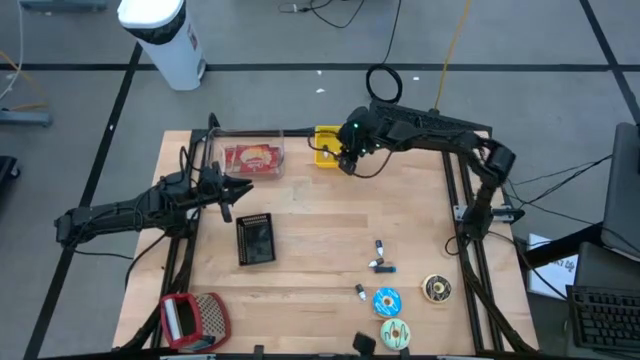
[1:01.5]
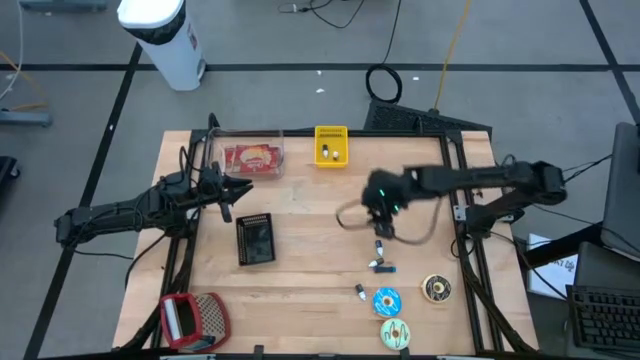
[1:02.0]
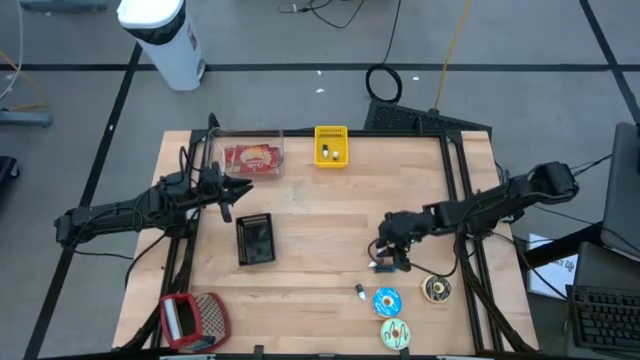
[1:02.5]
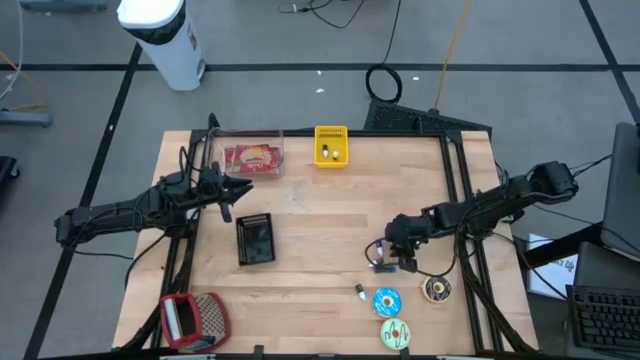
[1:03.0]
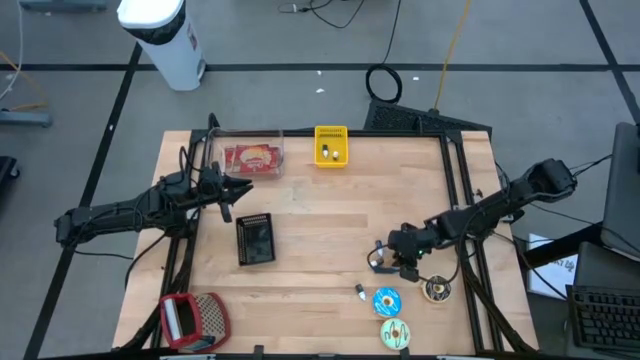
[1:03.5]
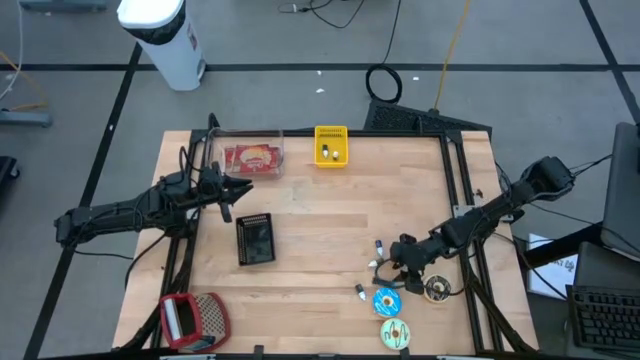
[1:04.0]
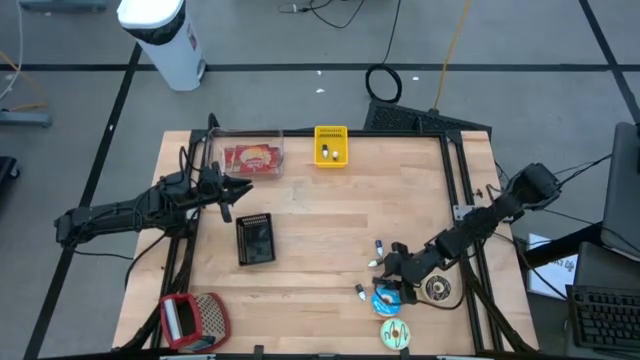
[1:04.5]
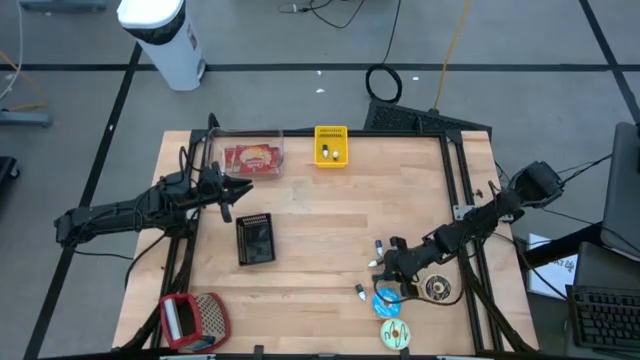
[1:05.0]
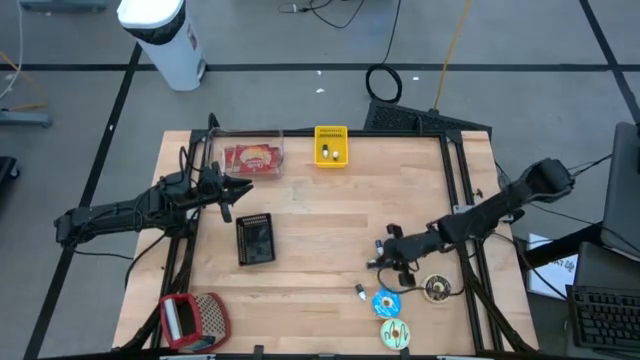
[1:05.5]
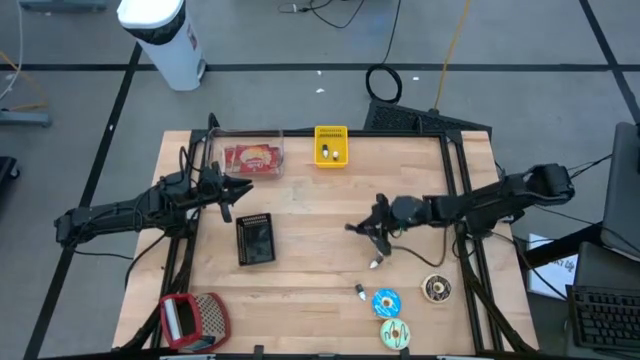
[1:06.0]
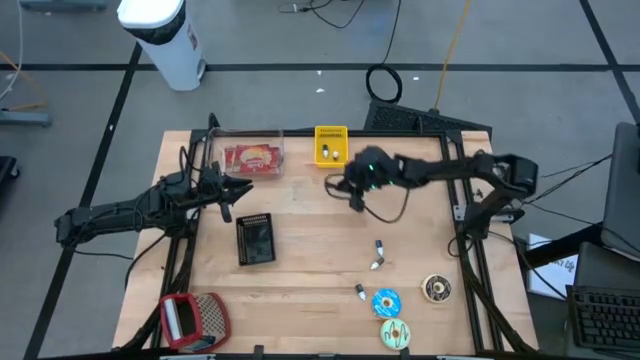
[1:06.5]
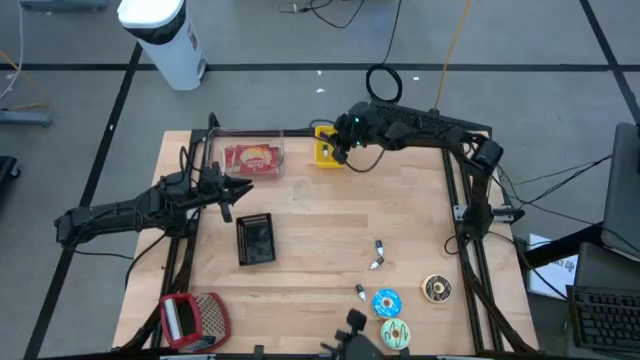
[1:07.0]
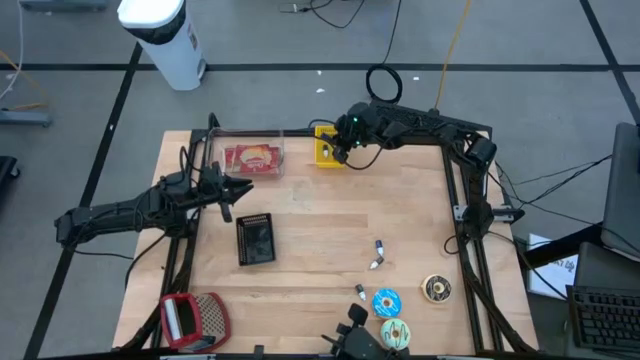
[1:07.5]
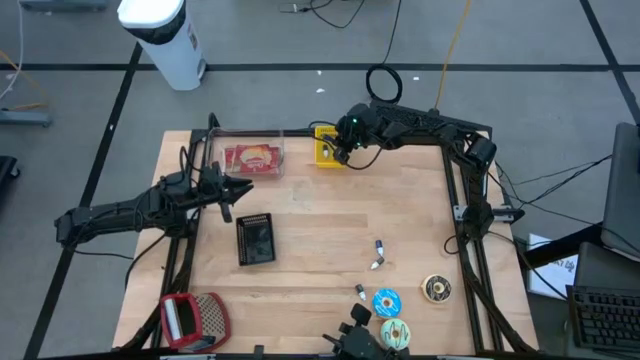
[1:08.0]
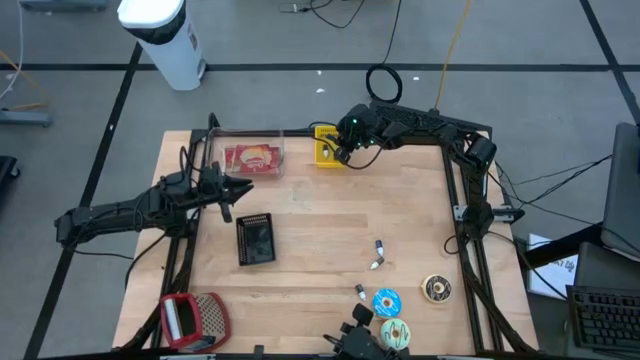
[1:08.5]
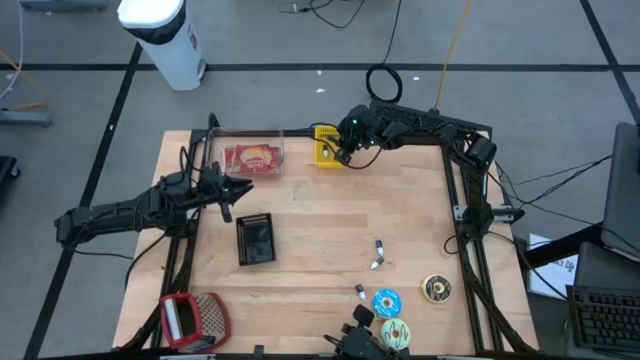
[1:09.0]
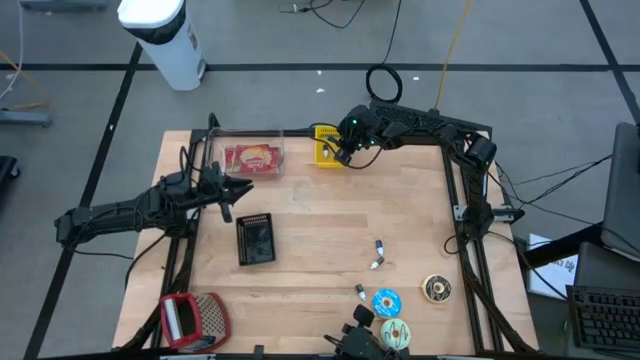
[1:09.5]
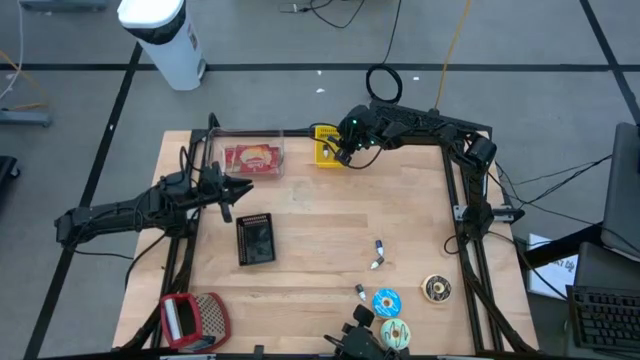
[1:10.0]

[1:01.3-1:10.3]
Task: Pick & Place Food Item
Put the bottom blue food coloring bottle into the yellow bin

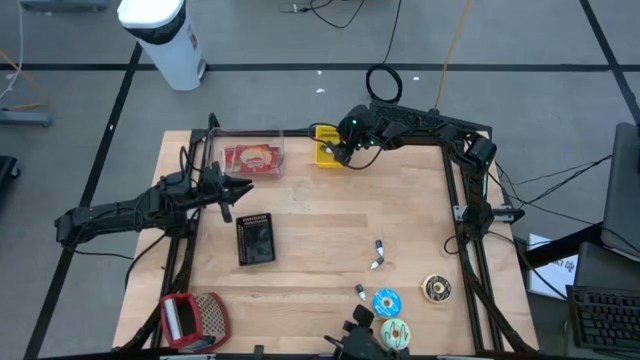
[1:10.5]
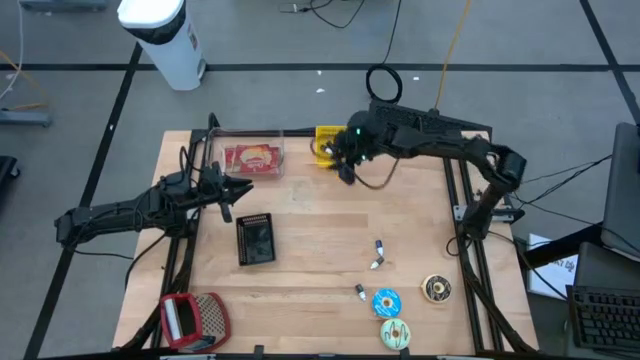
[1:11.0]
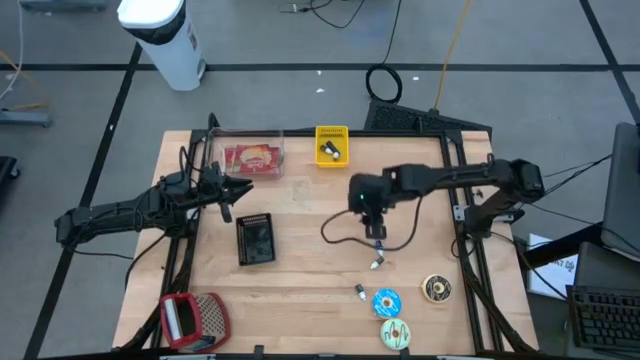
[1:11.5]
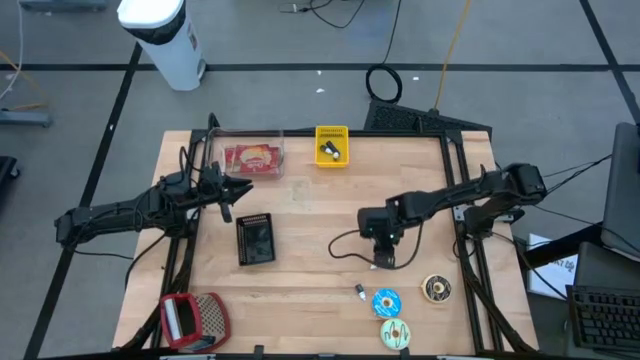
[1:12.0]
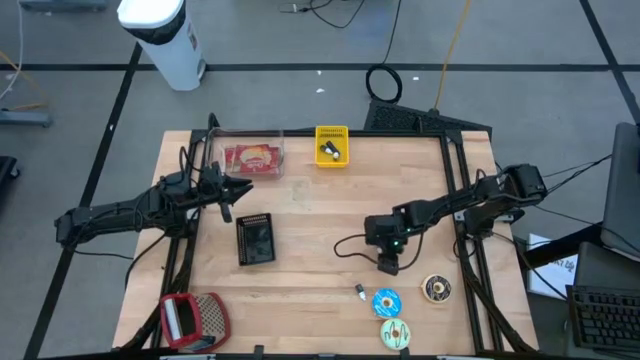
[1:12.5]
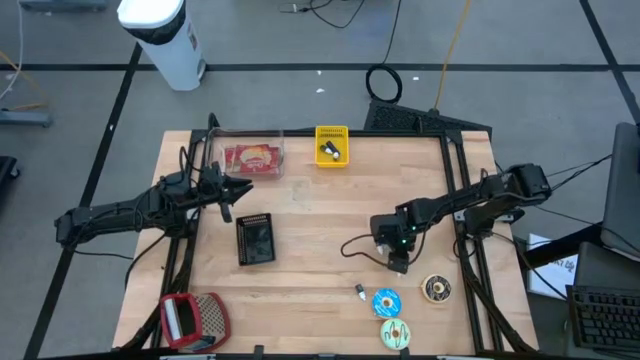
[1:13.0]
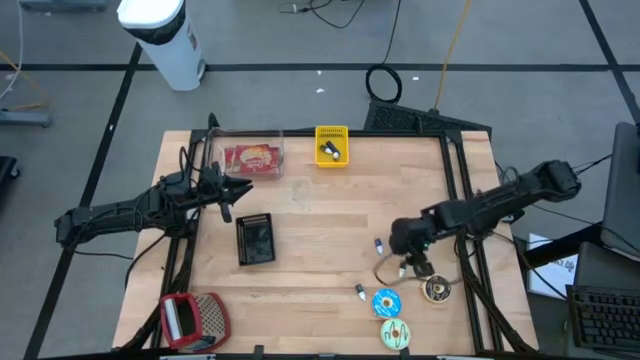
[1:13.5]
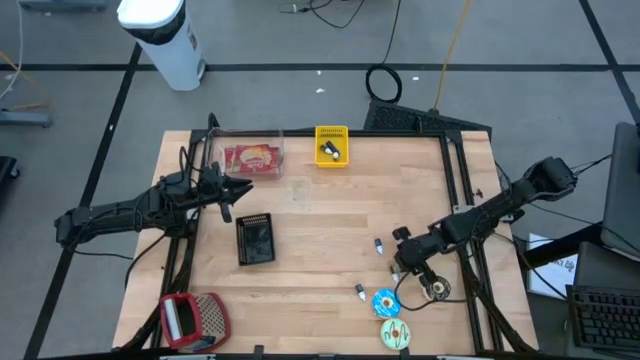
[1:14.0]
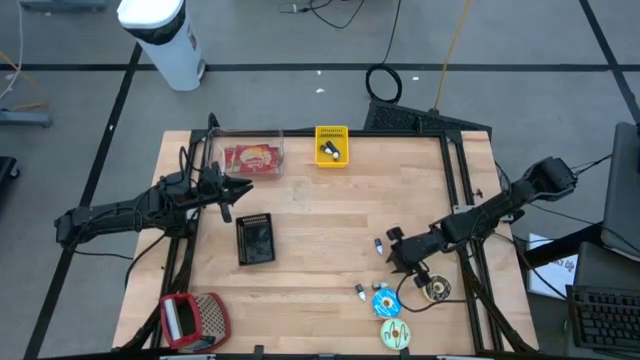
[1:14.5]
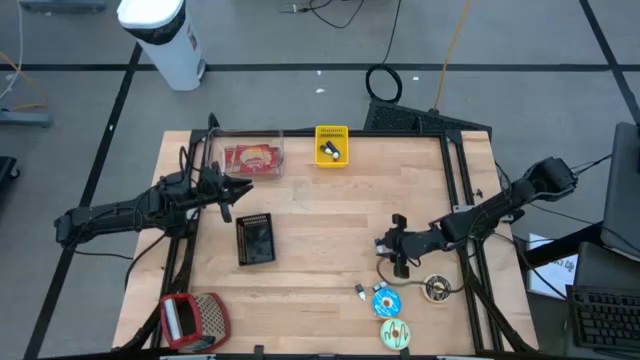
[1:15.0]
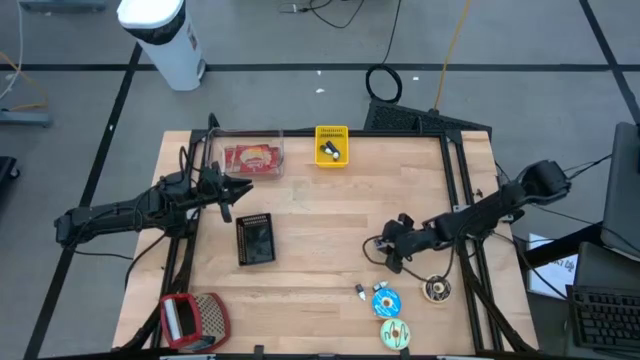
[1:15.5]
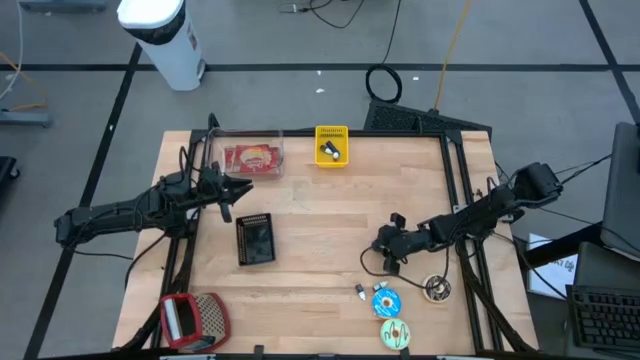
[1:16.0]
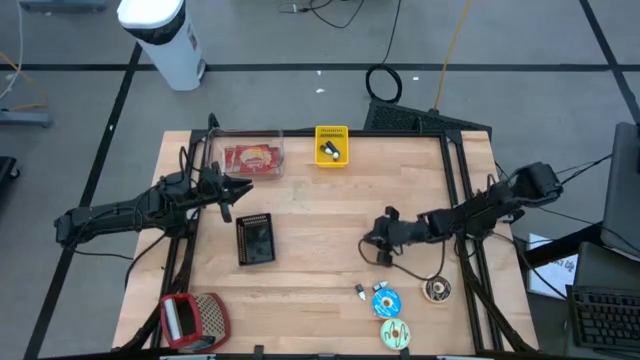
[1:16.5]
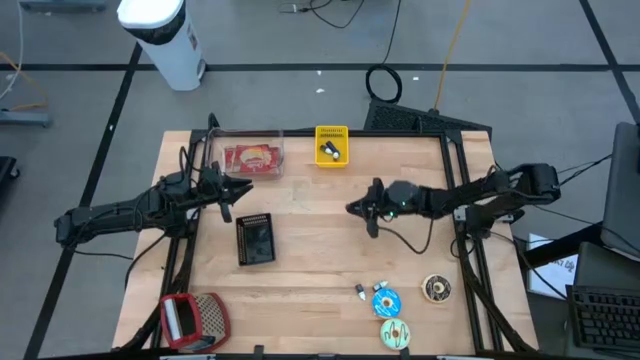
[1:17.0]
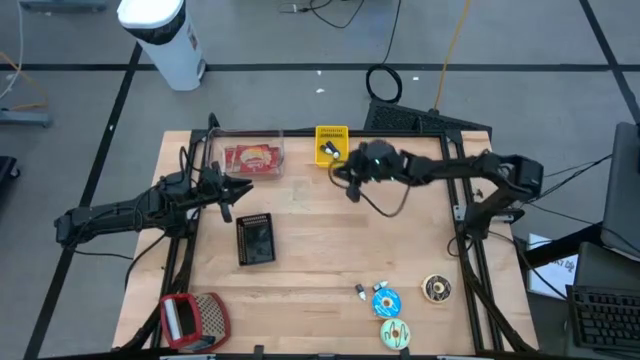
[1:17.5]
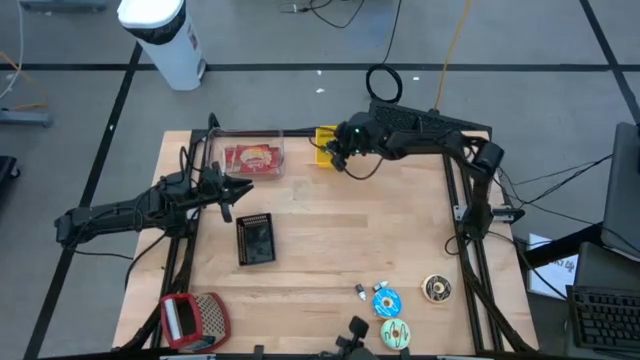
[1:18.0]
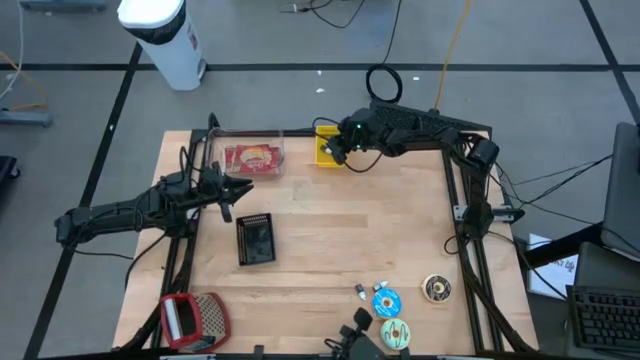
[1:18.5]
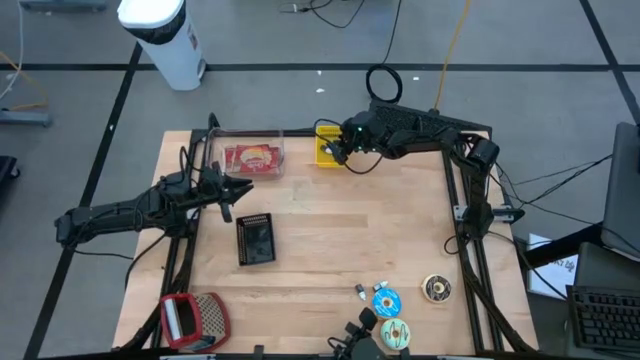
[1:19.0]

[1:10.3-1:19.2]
Put the blue food coloring bottle into the yellow bin

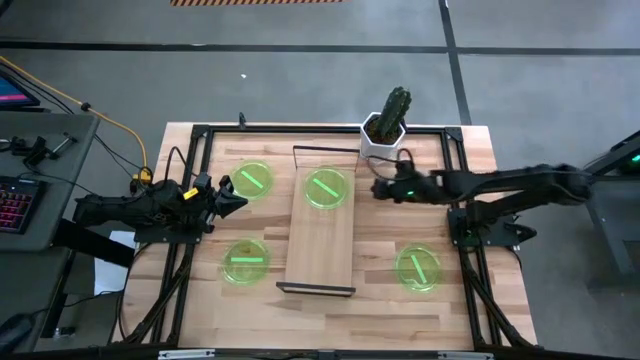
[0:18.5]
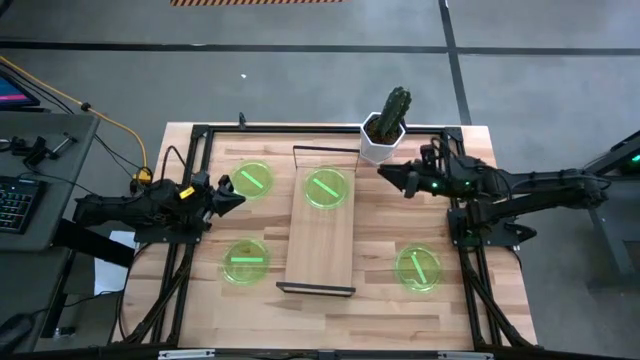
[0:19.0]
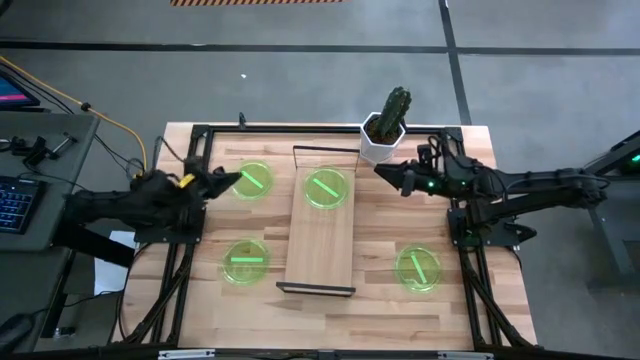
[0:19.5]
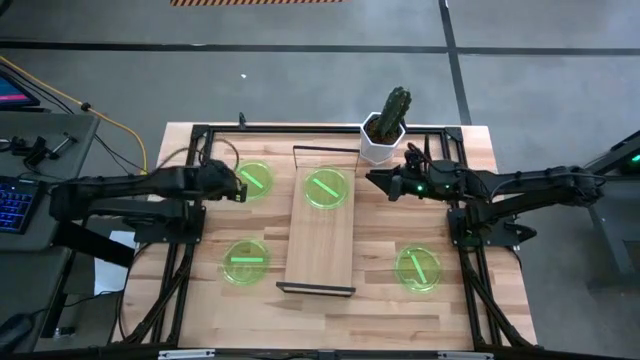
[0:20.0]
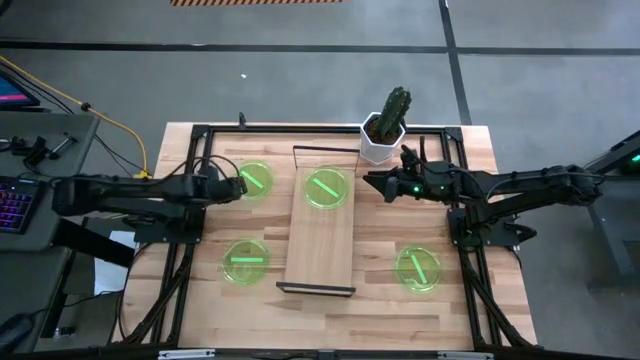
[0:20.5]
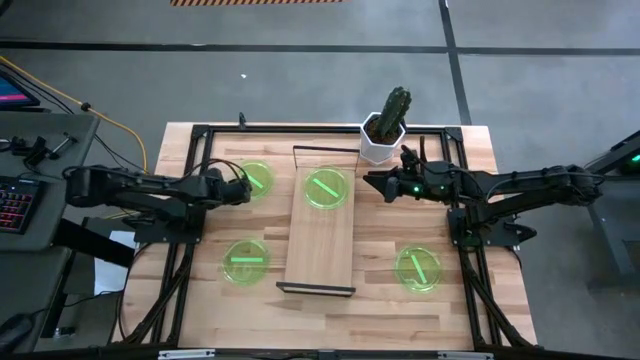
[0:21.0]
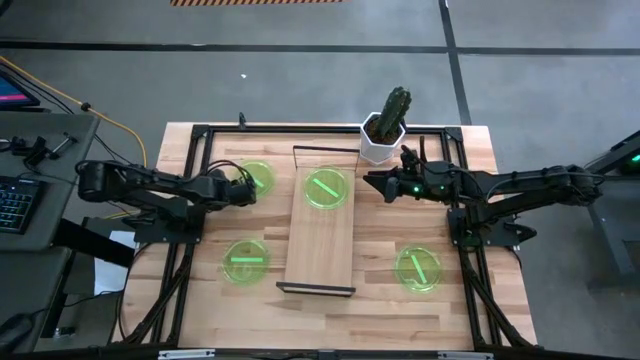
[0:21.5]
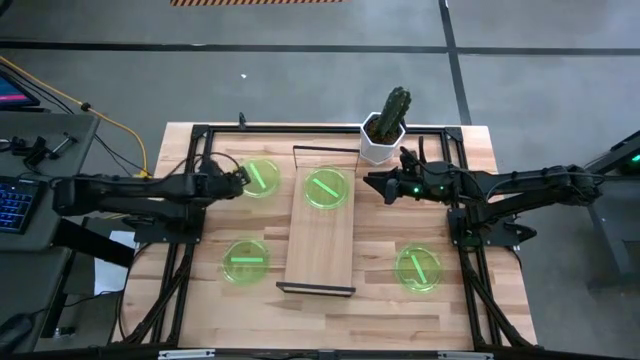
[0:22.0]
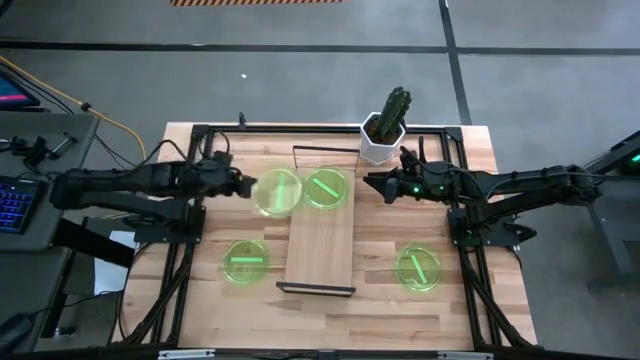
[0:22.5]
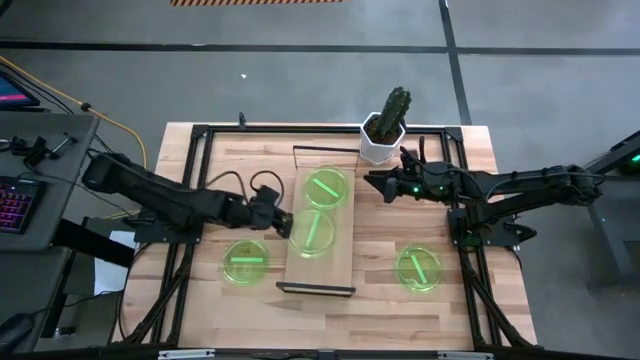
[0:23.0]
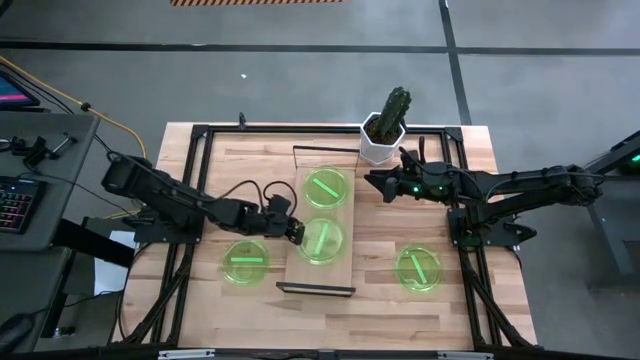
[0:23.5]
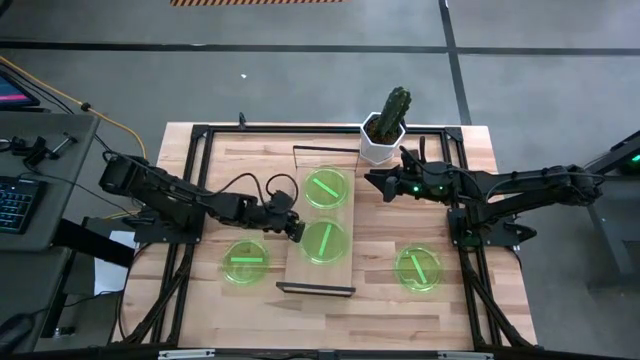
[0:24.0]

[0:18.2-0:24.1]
Task: Place and stack plates onto a shelf
Put the top left green plate on the shelf
